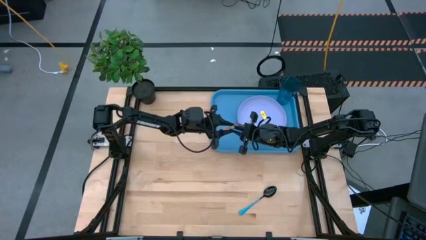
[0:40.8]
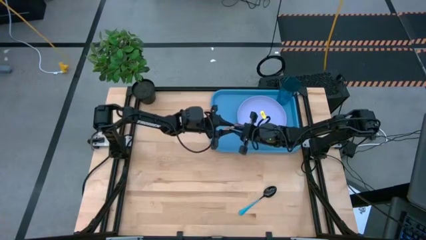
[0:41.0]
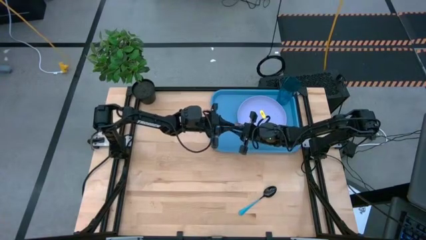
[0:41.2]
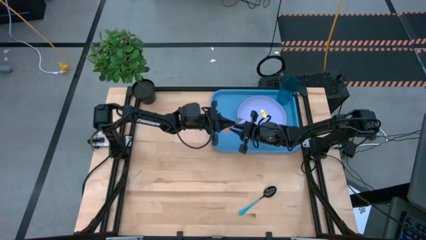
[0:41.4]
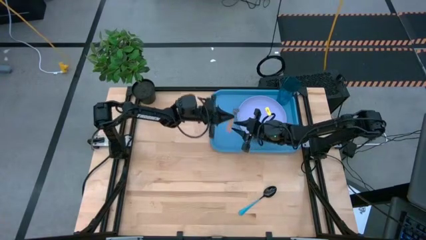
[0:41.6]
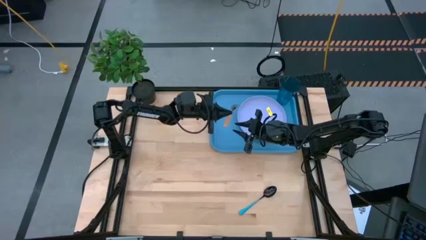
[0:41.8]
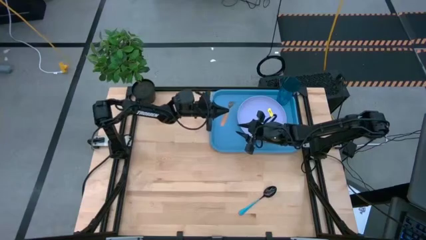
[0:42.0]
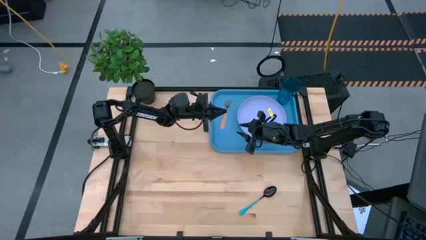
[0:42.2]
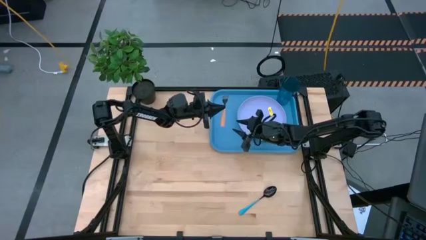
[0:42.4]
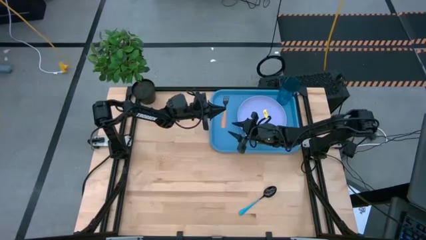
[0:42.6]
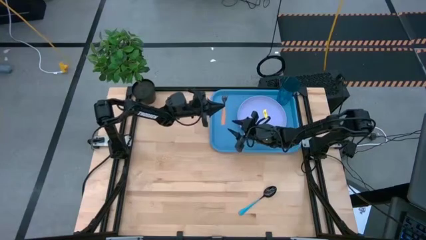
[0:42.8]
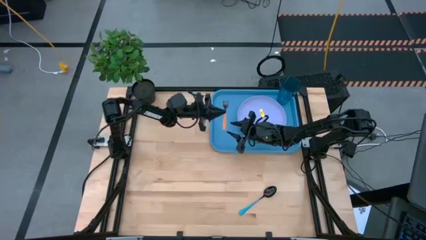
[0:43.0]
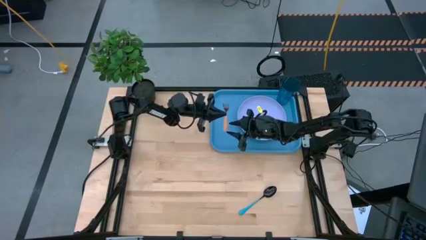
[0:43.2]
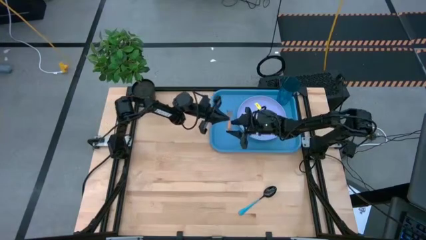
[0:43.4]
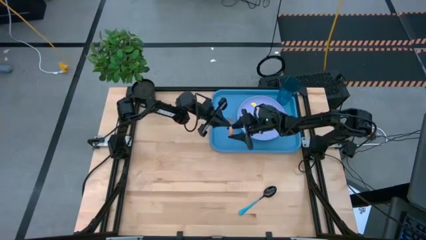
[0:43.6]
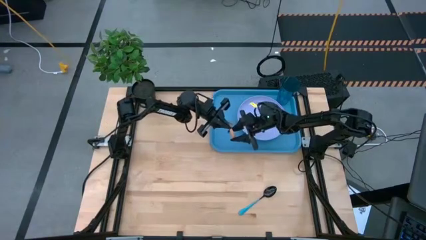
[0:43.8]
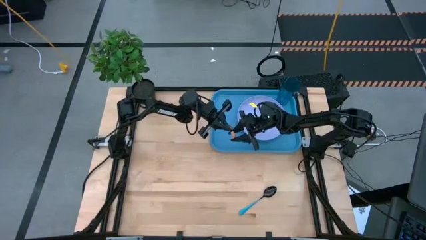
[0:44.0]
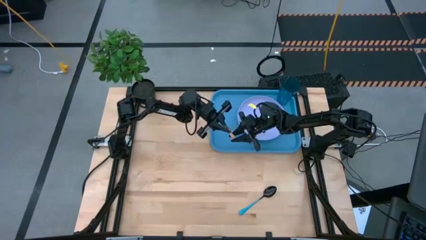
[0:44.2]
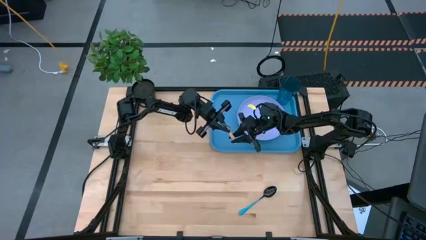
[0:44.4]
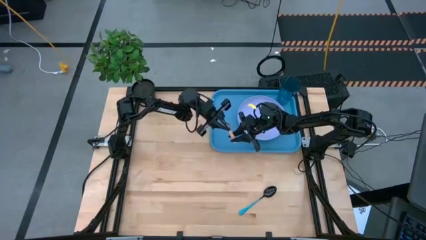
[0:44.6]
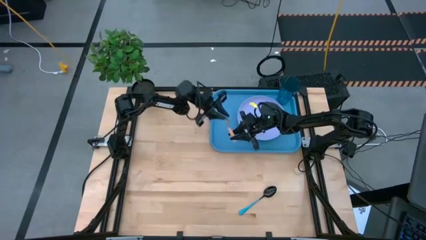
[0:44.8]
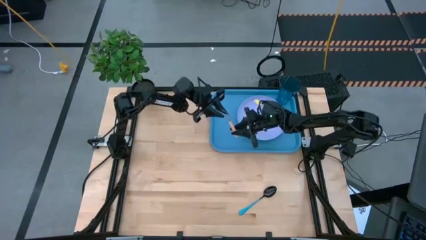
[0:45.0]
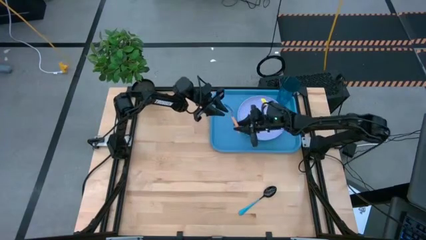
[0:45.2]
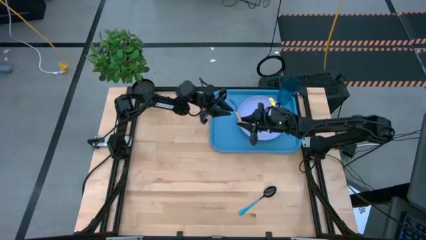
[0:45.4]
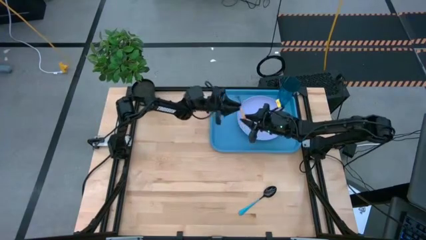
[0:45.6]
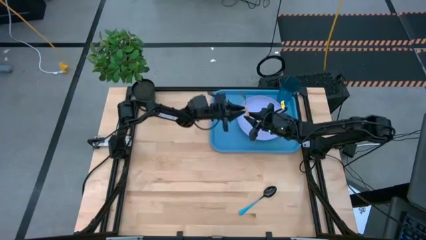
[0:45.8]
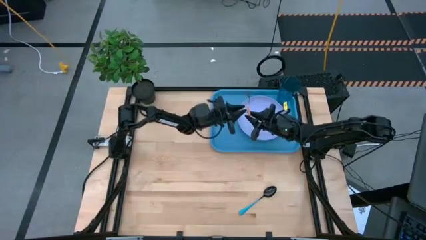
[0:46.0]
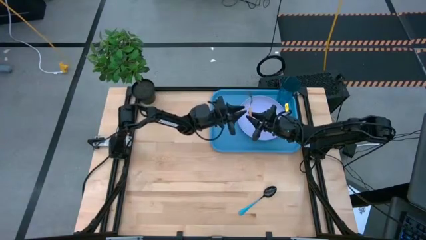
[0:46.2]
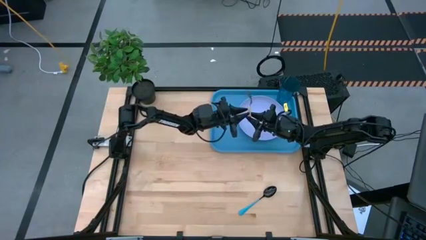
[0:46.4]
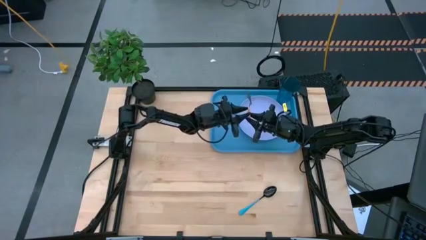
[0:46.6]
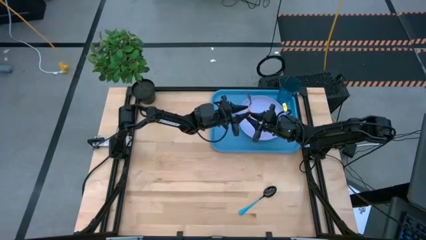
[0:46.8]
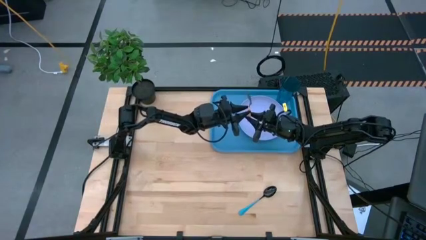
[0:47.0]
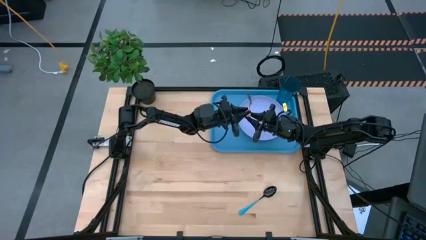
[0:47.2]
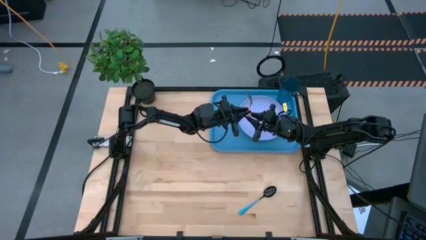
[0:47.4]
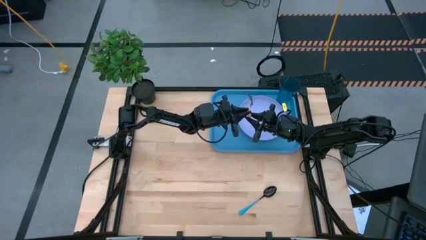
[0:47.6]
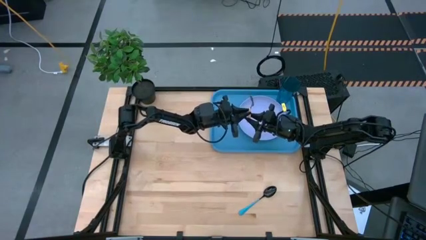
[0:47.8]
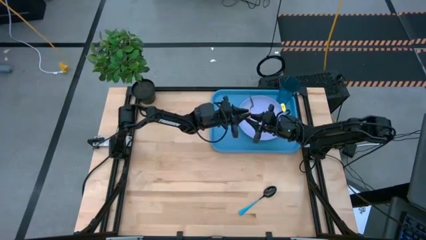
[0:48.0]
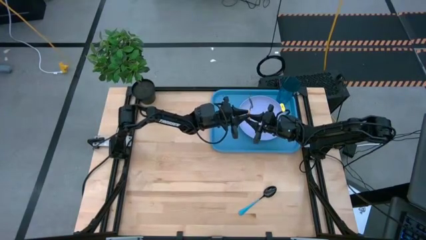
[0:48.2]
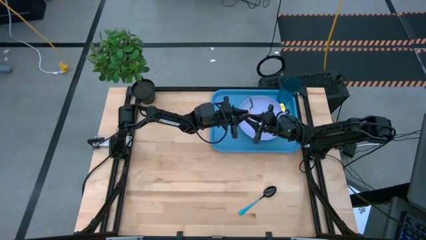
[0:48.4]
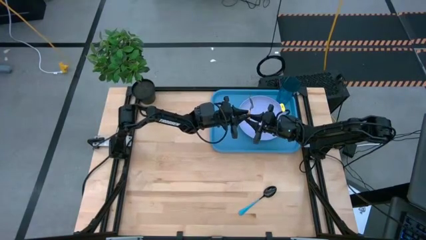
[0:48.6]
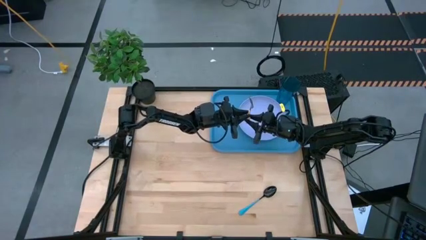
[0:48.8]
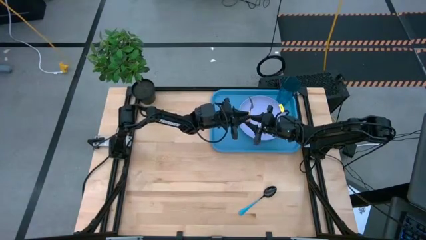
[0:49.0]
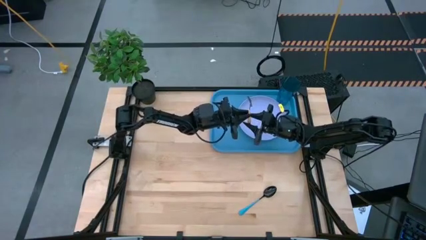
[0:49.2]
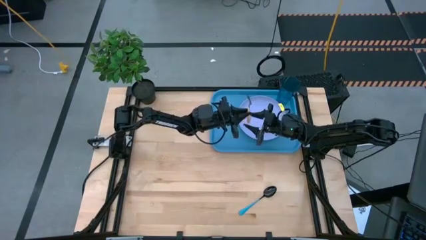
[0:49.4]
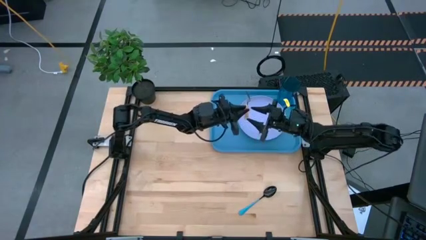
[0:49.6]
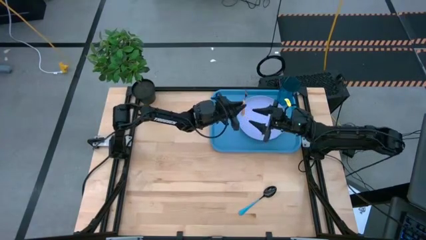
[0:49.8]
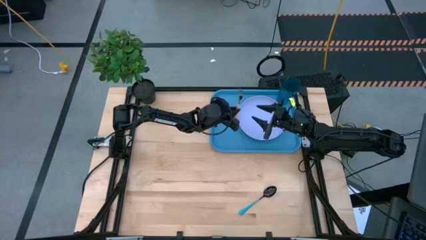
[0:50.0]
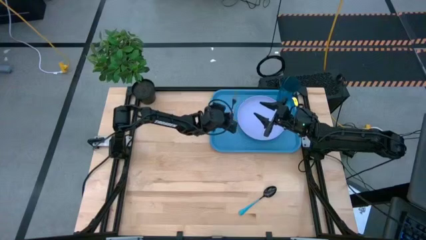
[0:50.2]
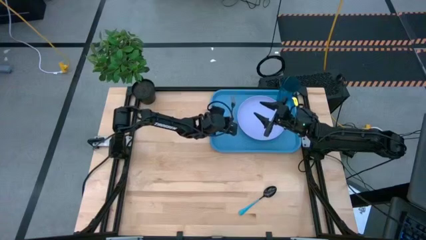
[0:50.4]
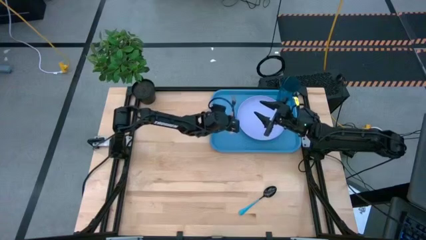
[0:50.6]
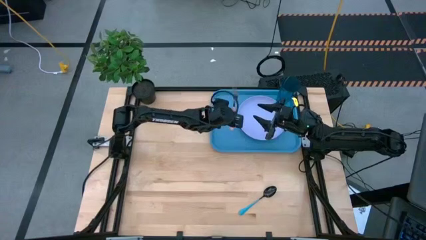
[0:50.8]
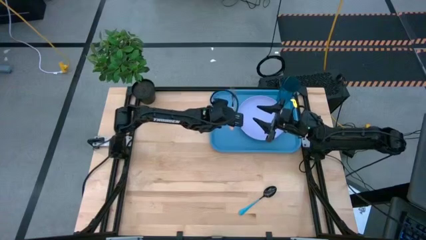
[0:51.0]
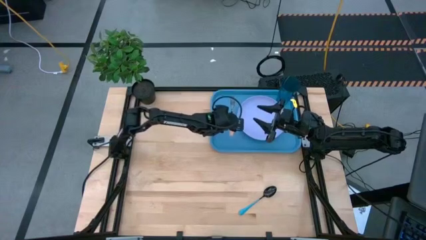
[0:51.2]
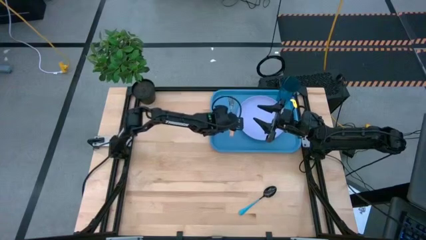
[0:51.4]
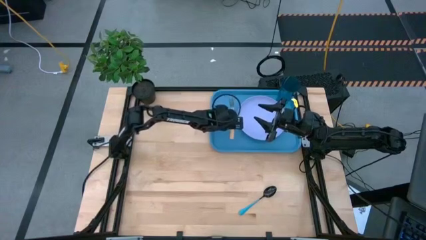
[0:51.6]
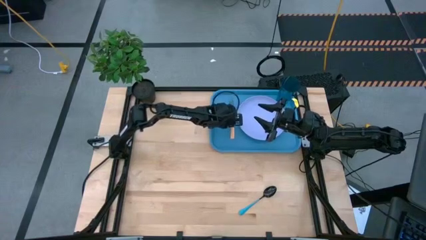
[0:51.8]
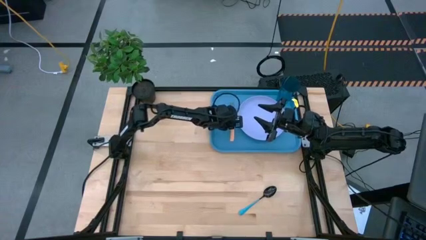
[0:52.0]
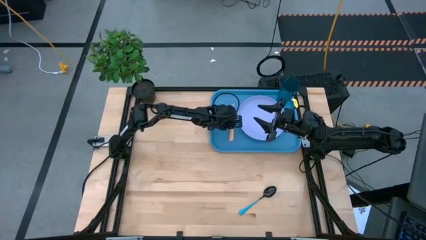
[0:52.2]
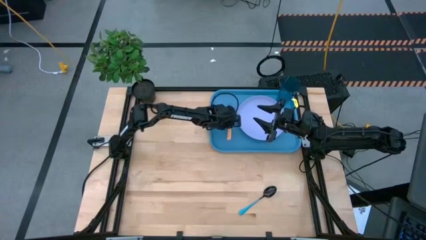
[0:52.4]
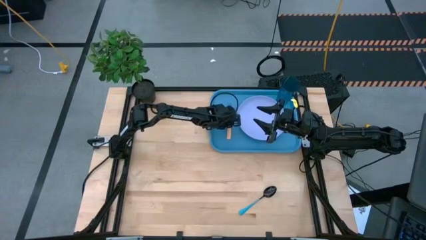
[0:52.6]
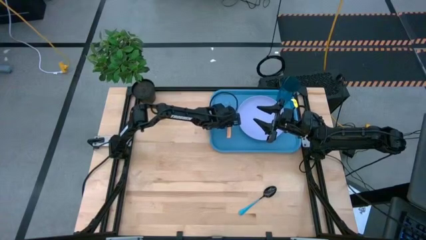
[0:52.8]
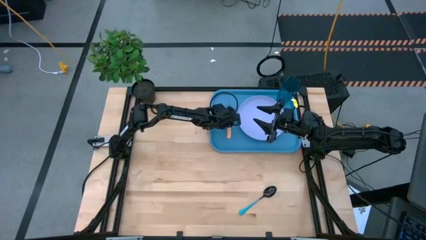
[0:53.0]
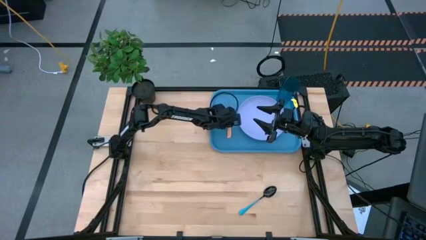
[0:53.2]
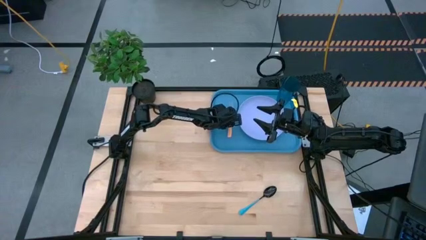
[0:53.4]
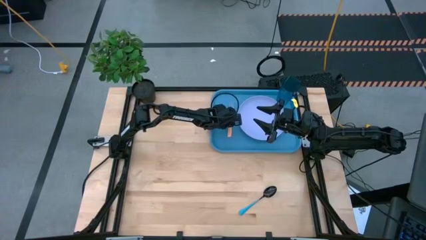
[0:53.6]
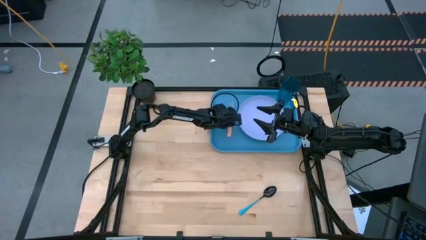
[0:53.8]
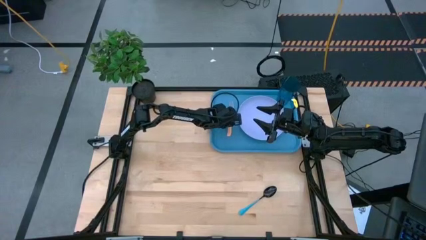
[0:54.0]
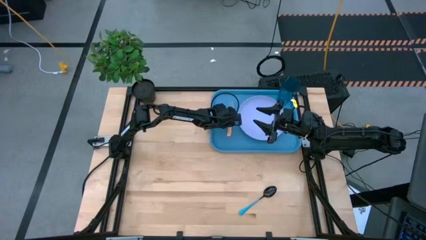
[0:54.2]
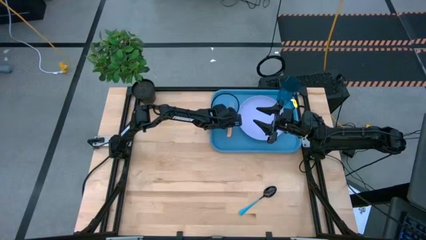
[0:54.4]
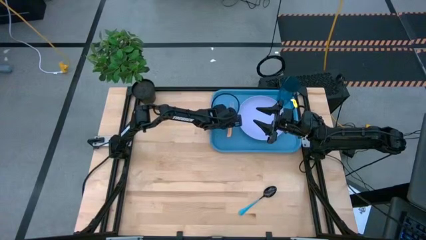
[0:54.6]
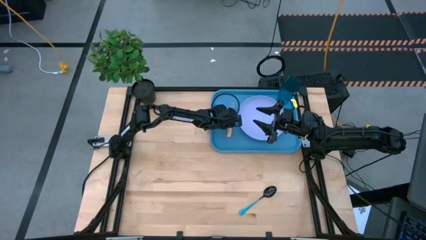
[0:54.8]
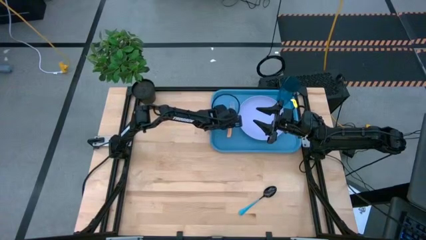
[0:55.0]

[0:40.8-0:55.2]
Task: Pick and place plate/cup/fork/spoon on tray
Put the brown fork on the blue tray to the left of the purple plate
